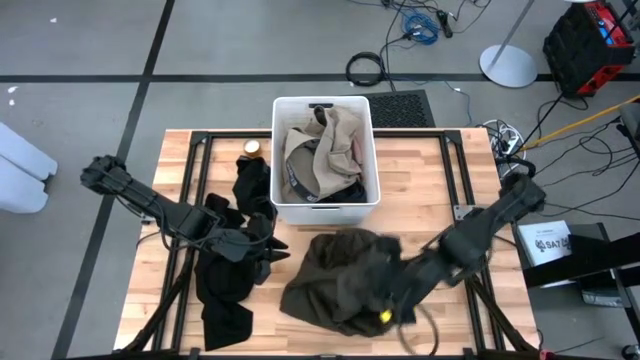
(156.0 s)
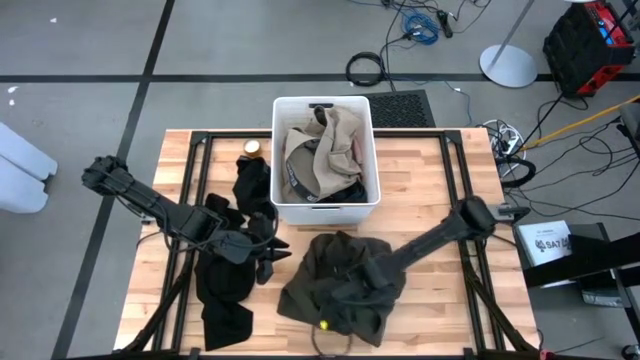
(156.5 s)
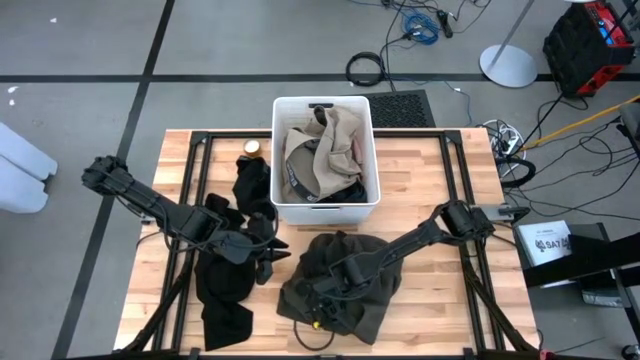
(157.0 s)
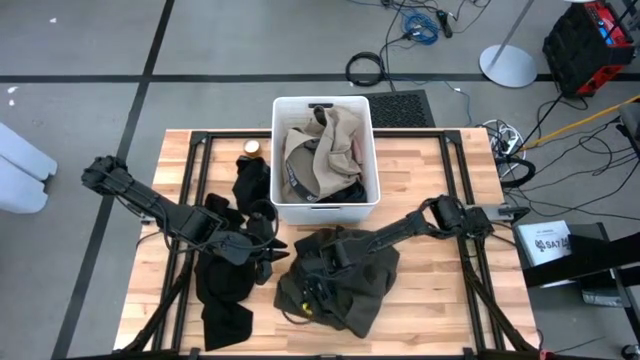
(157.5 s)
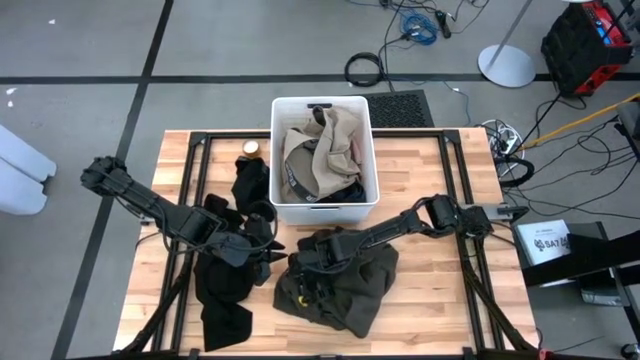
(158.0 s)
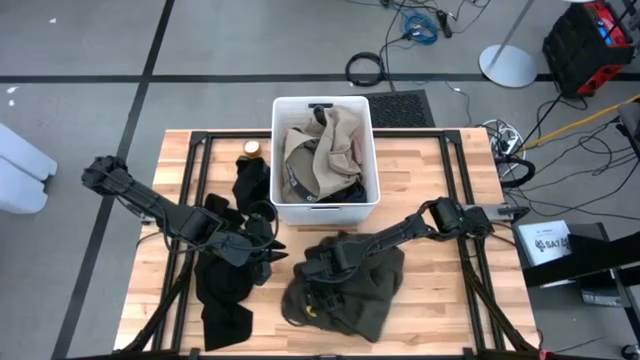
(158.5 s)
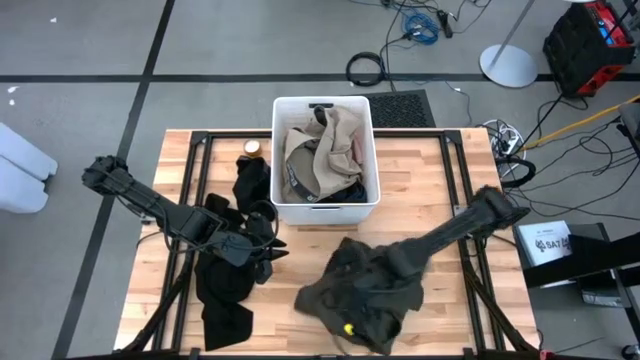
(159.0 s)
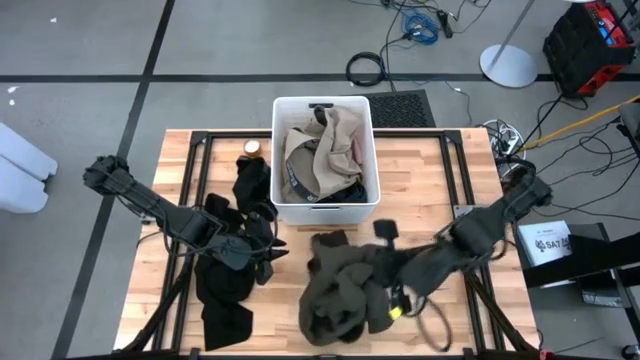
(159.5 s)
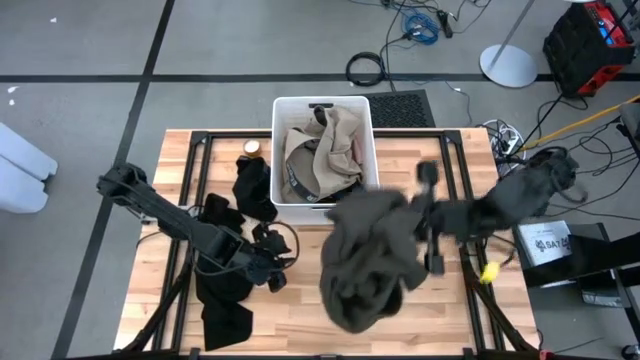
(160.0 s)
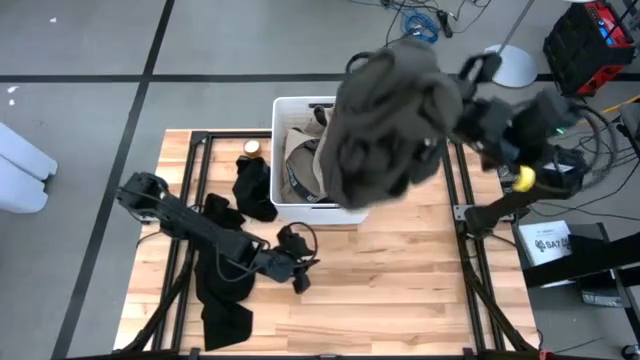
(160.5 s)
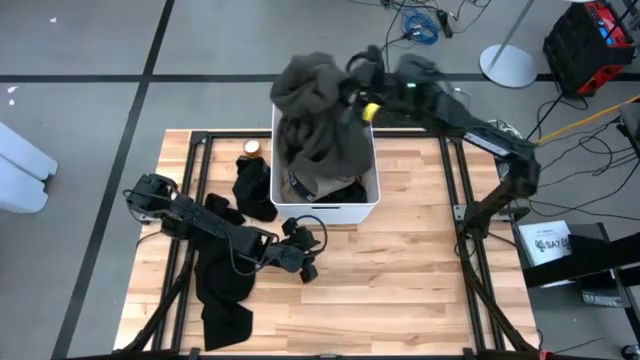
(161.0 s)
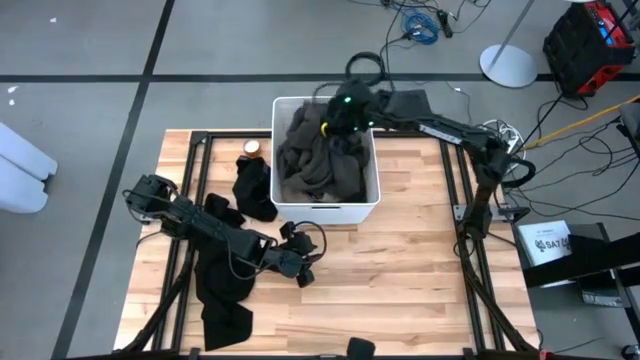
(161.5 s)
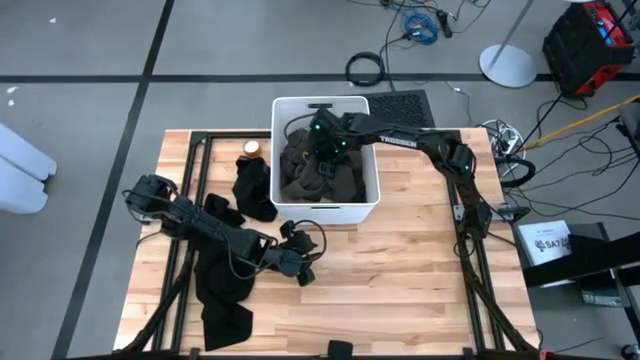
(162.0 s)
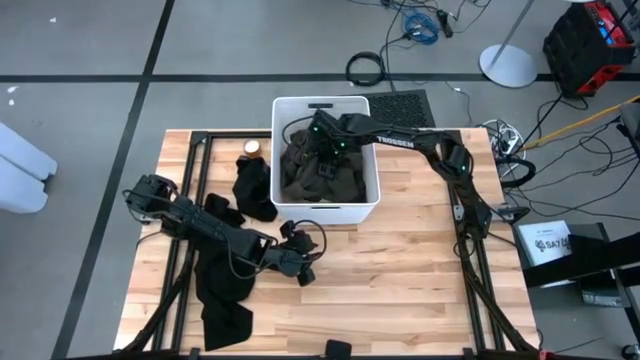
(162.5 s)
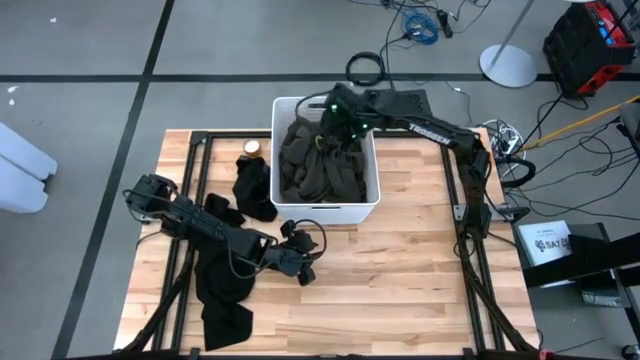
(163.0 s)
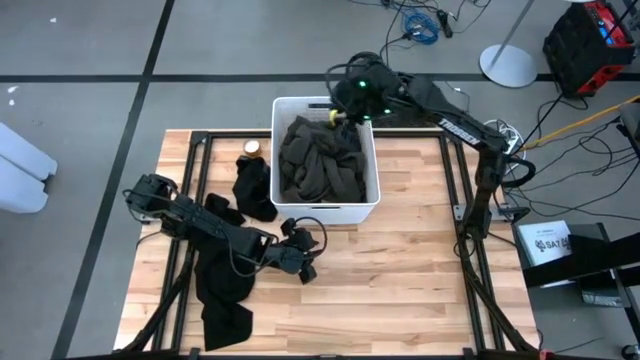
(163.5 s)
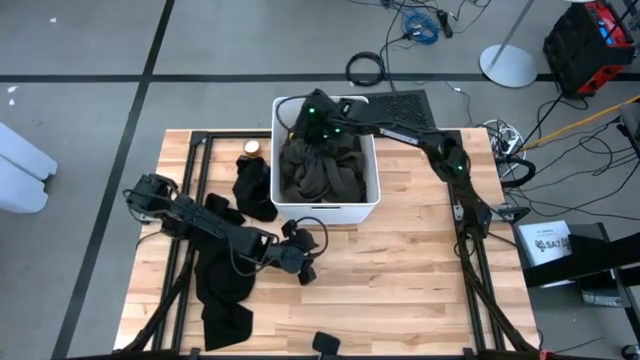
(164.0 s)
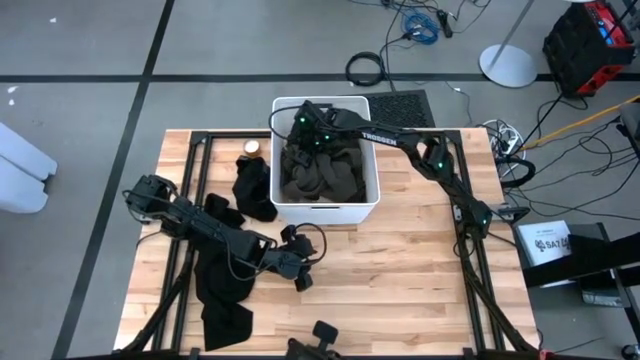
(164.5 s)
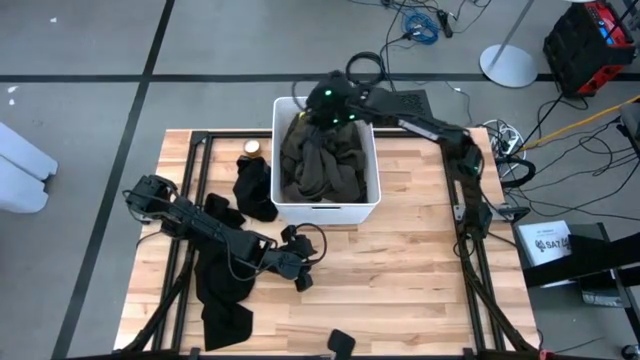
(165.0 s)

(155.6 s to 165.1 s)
Task: Fold laundry
Put the folded black jacket into the white laundry bin

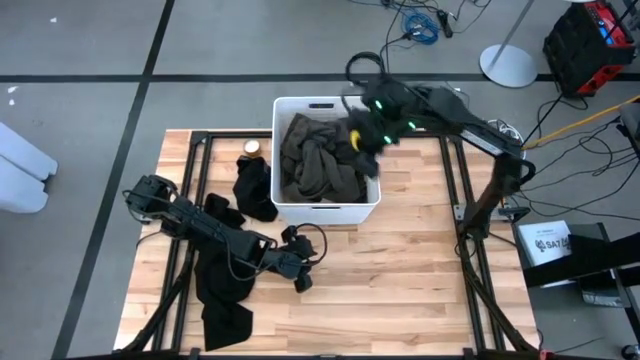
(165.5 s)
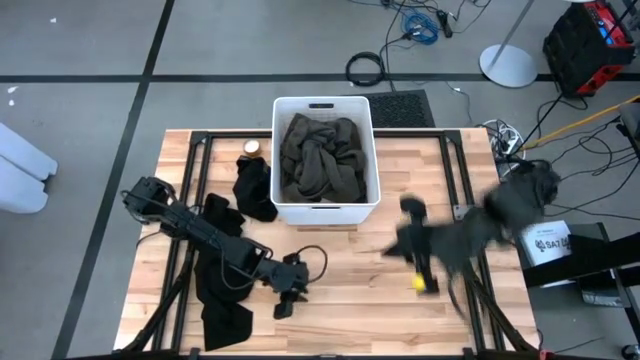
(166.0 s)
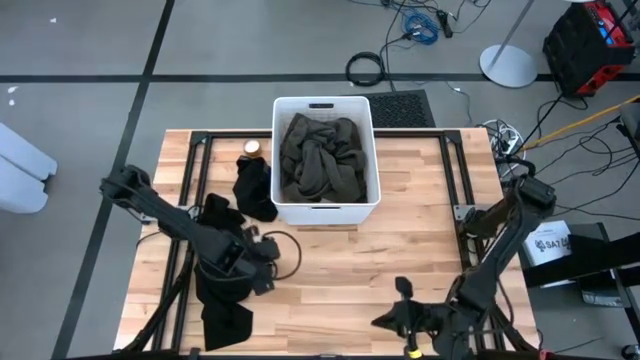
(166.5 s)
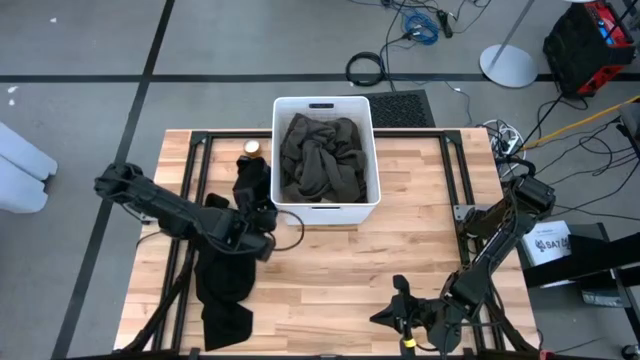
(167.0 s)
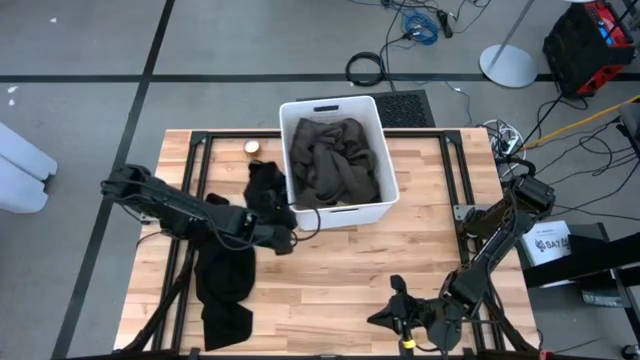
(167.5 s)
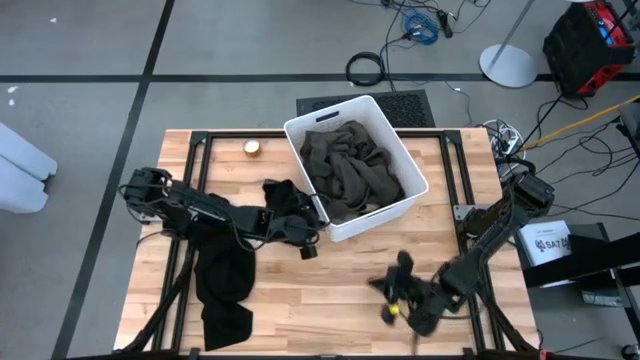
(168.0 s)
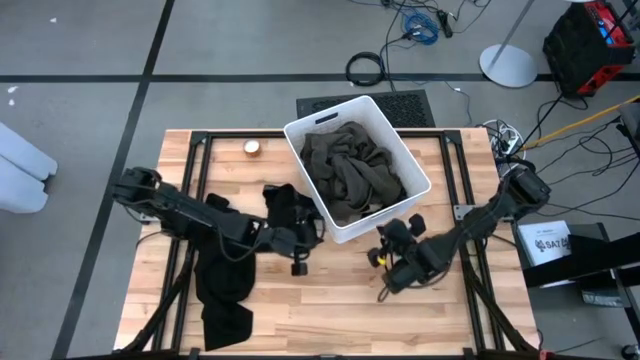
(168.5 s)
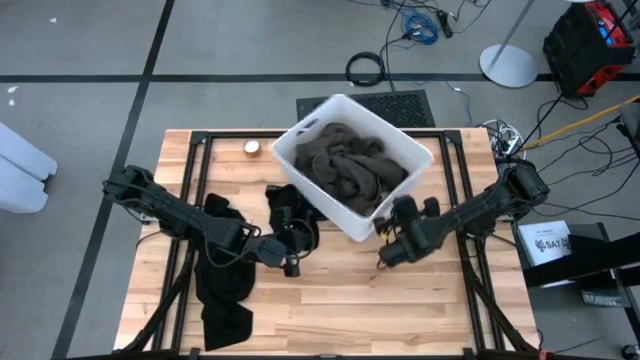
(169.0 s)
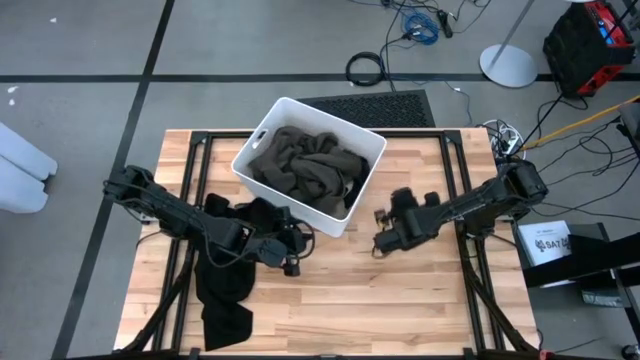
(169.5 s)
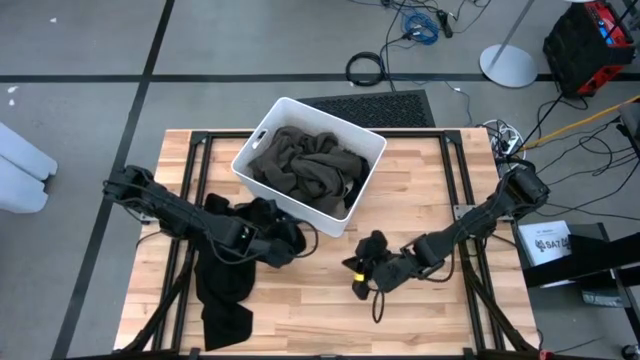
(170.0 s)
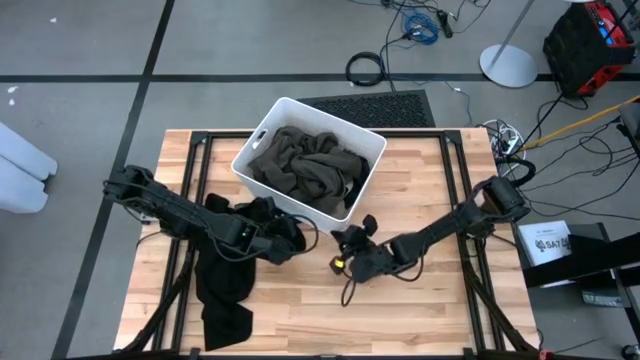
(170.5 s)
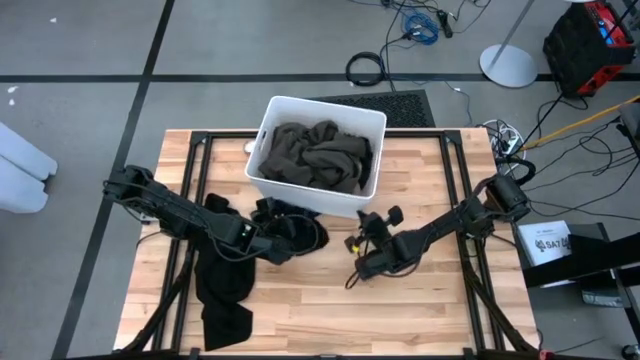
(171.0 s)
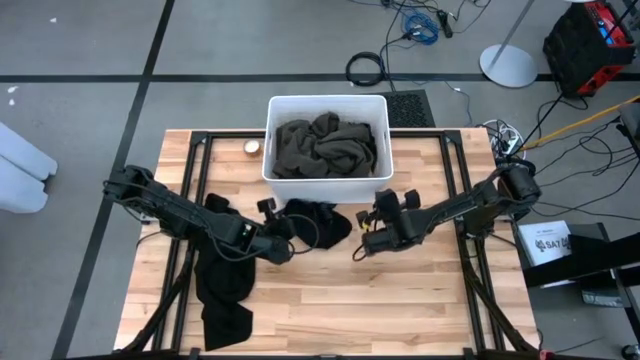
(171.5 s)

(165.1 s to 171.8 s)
Adjust the white laundry bin

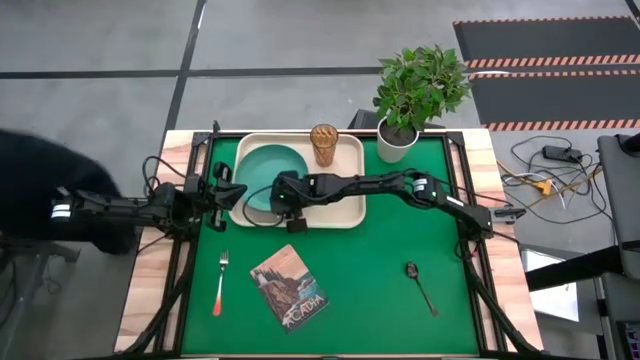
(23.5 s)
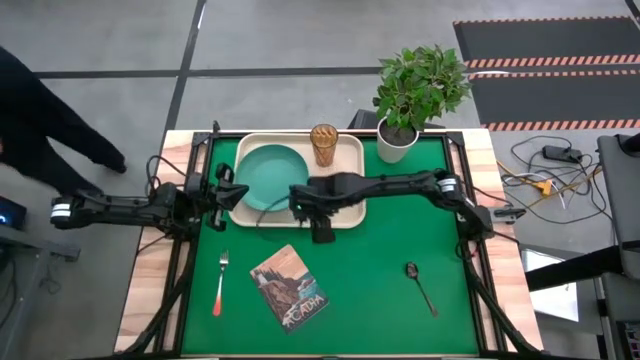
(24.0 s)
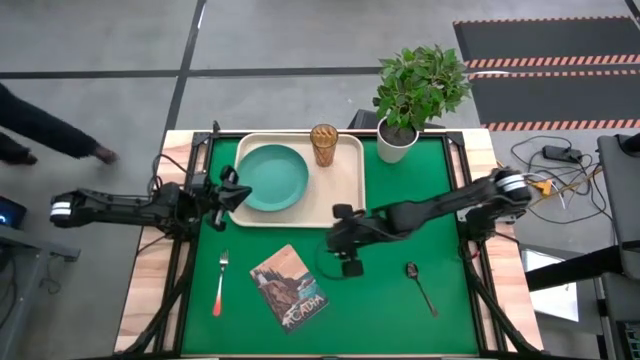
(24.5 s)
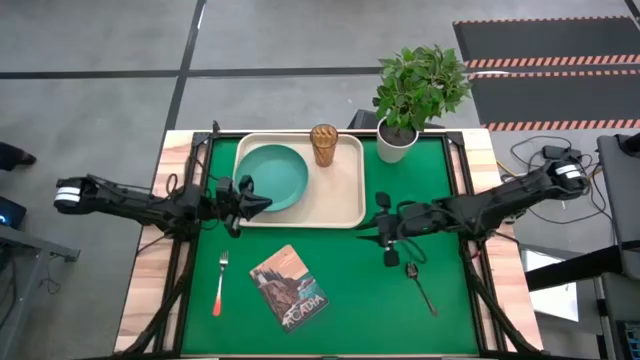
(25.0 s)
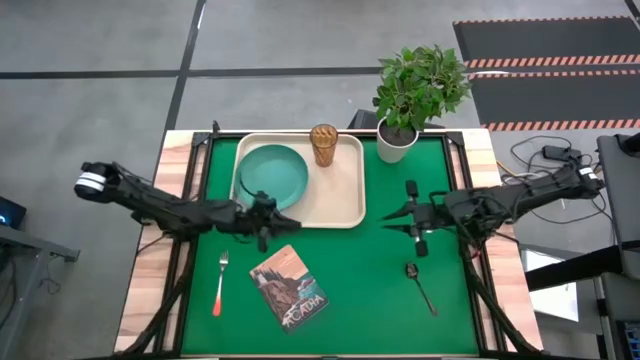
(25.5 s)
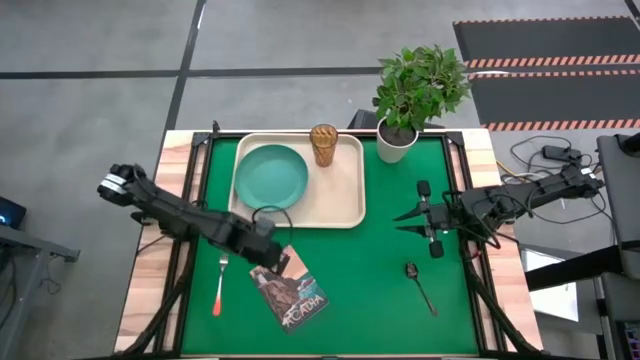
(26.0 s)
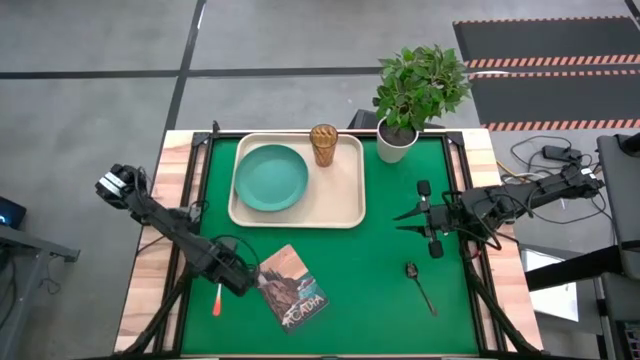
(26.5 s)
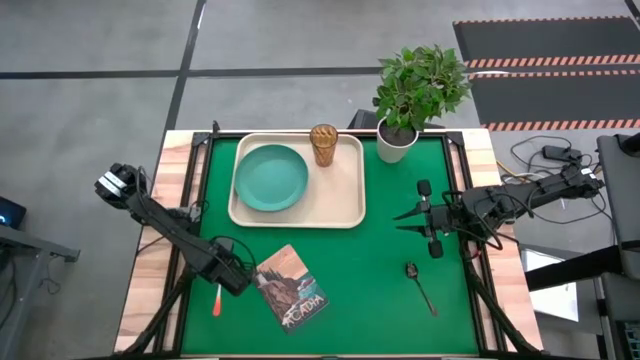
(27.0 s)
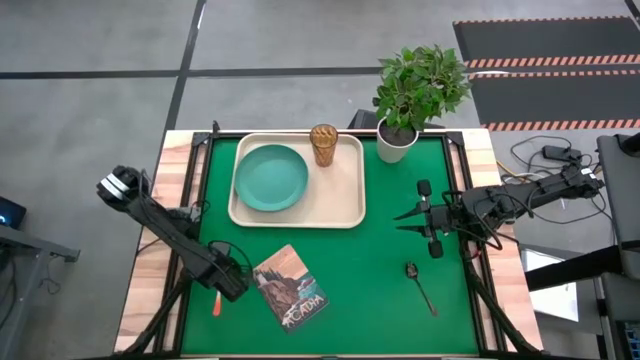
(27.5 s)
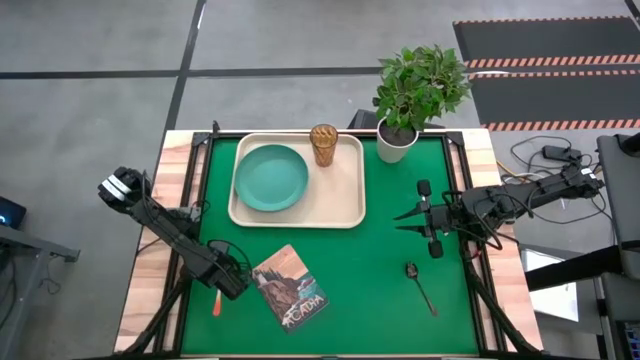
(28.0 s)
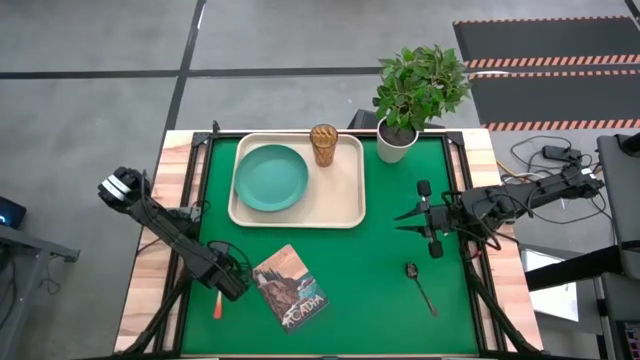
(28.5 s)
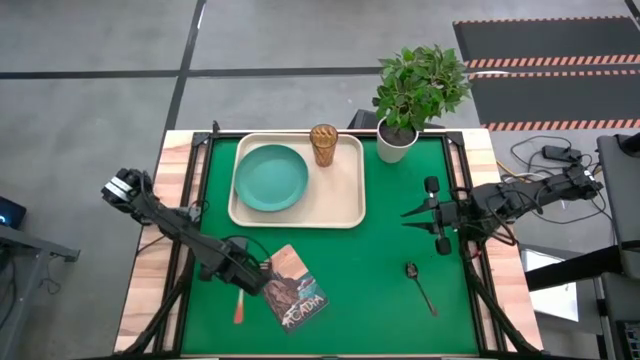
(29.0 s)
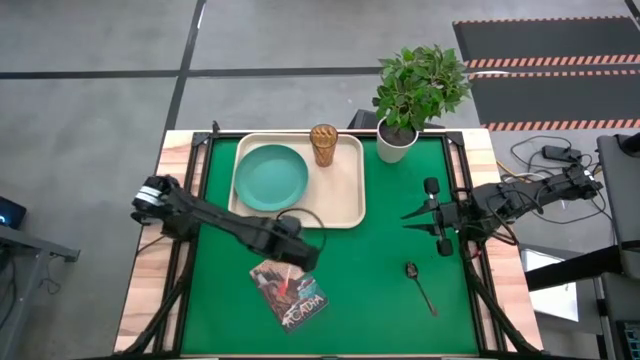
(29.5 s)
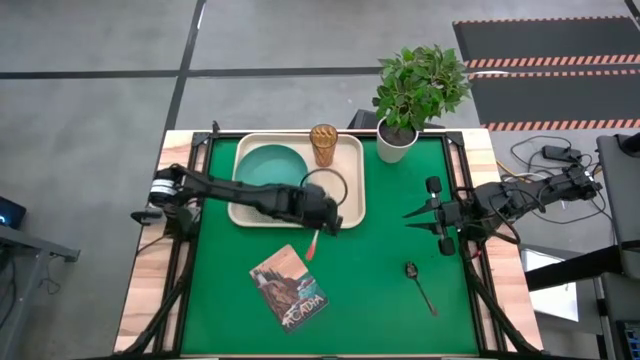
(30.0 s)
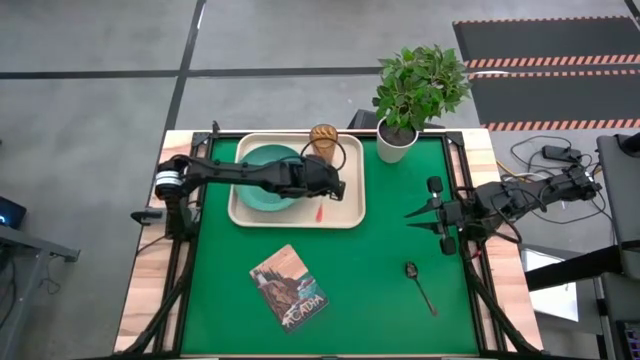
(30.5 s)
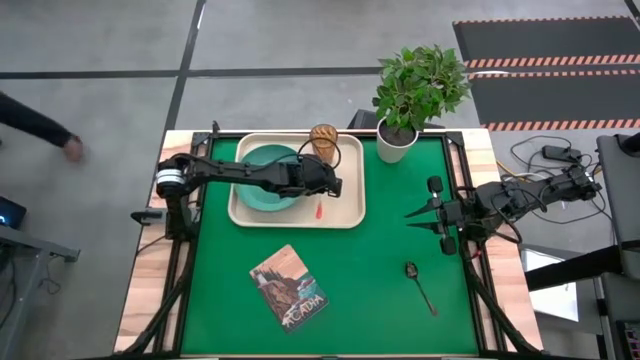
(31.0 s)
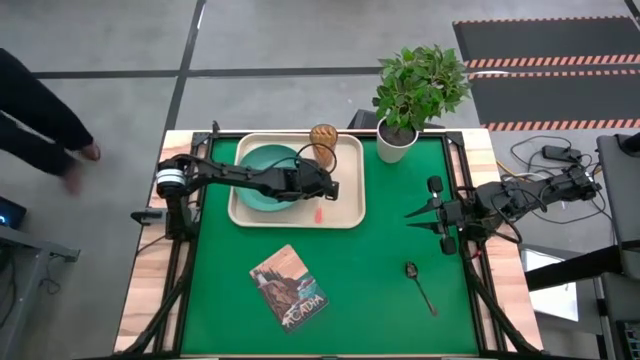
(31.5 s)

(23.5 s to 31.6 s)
Task: Pick and place plate/cup/fork/spoon on tray
Put the orange fork on the tray at the bottom of the brown cup
